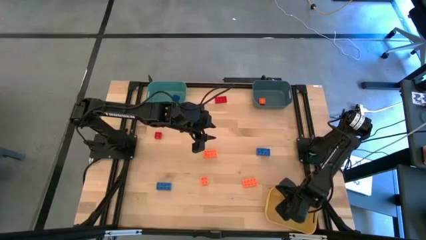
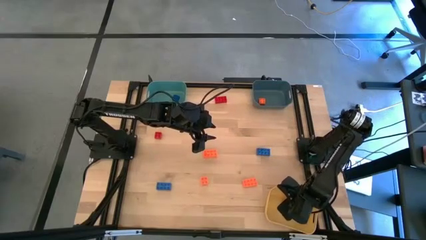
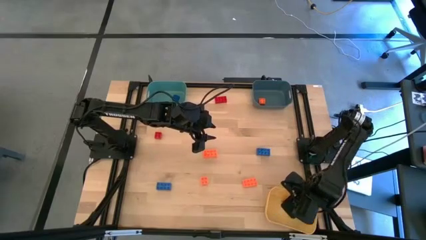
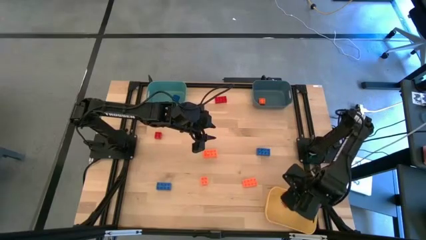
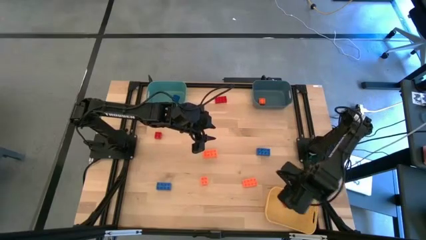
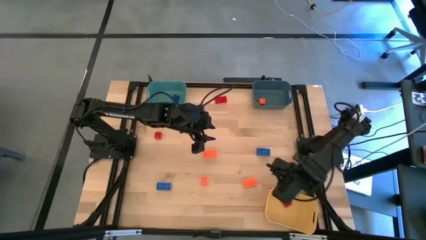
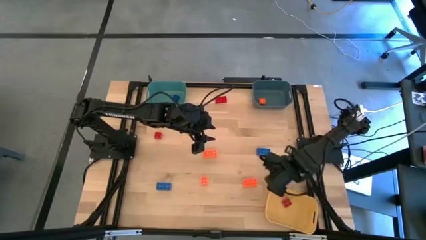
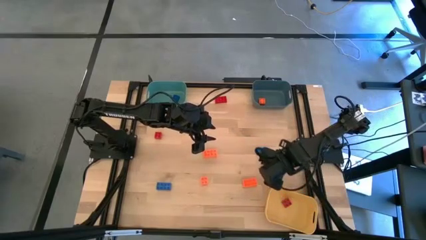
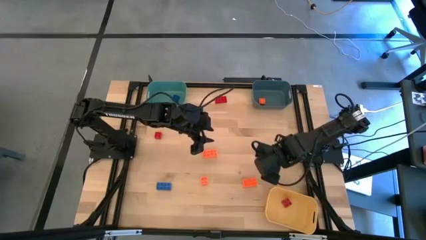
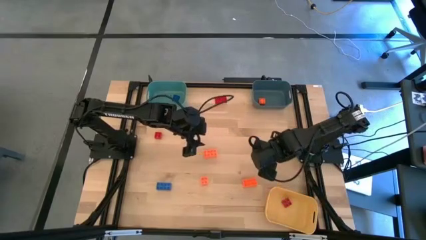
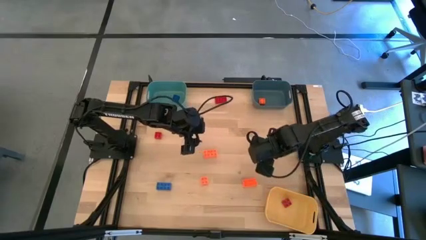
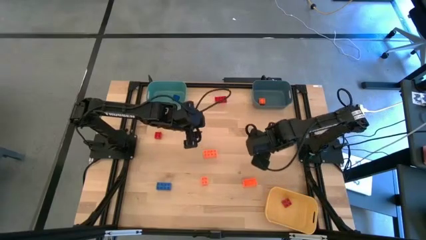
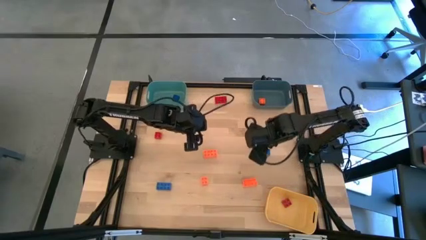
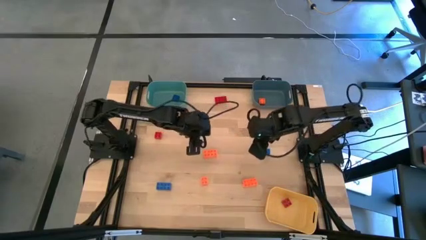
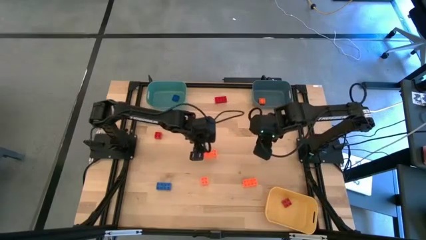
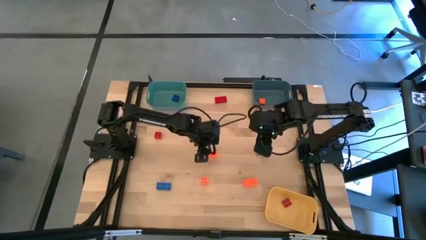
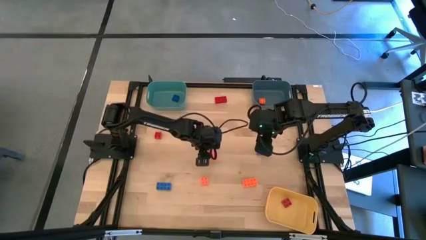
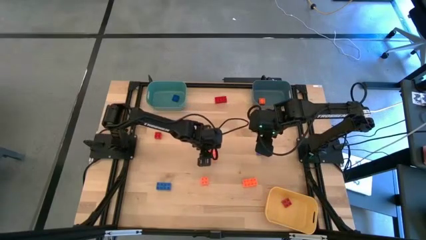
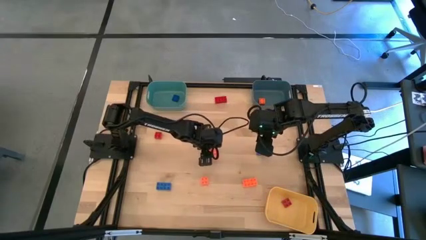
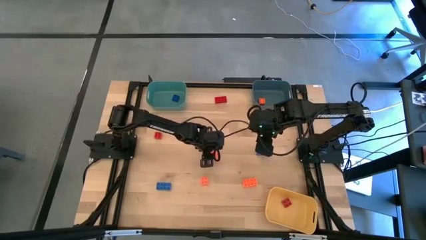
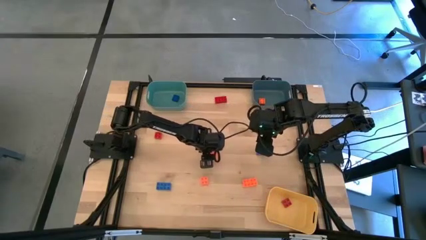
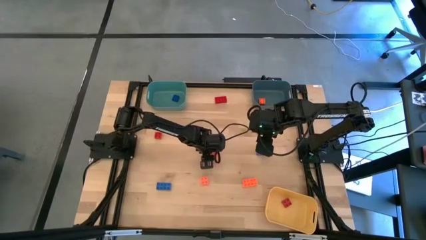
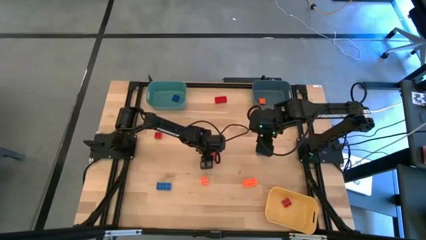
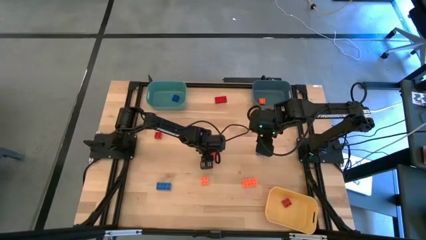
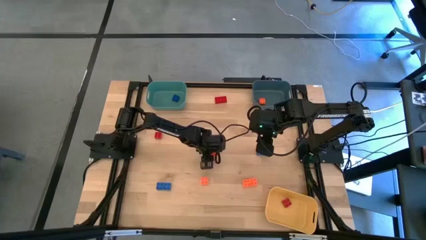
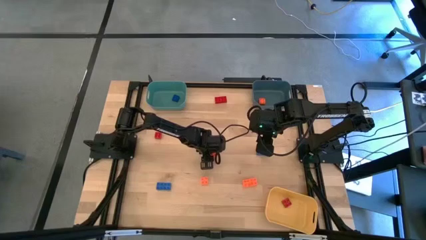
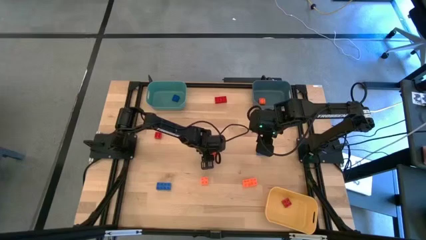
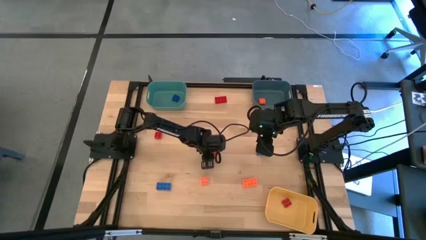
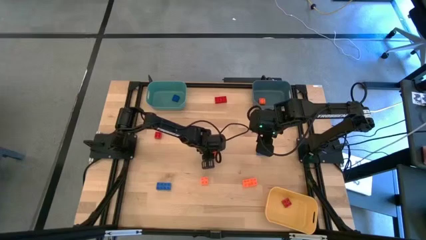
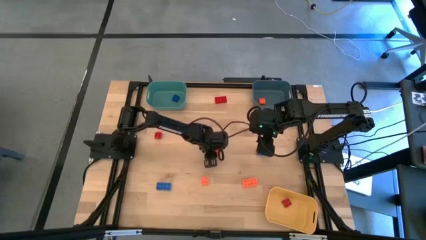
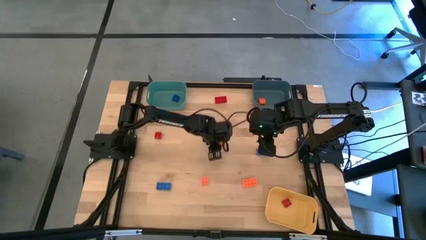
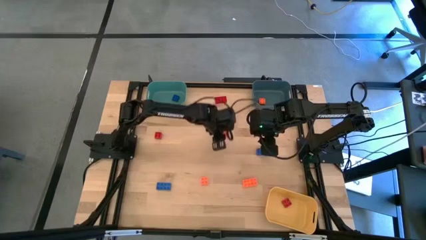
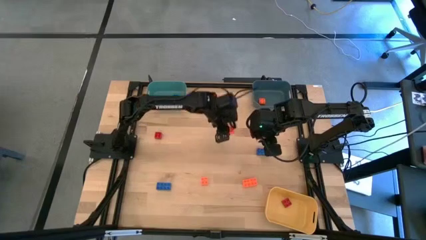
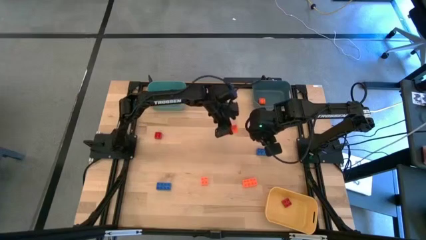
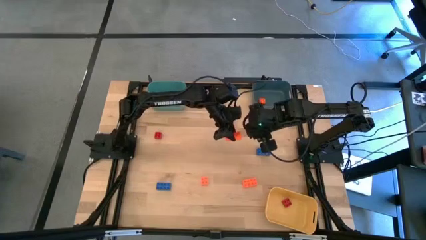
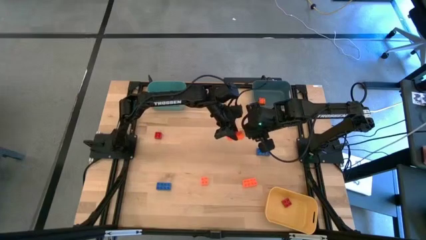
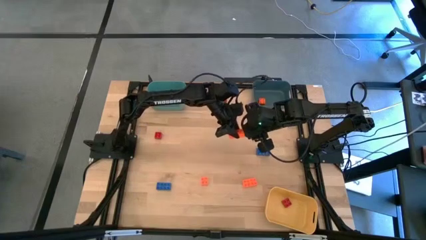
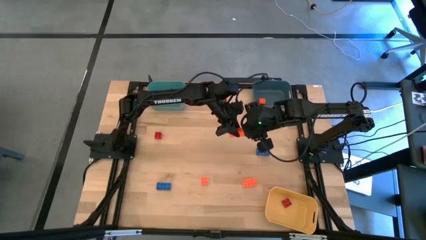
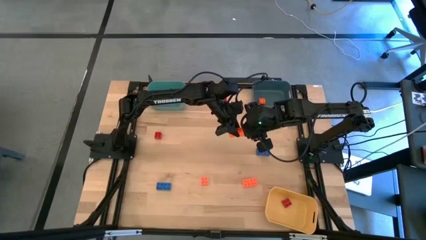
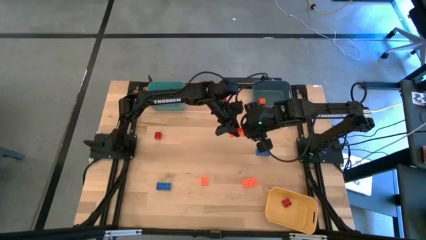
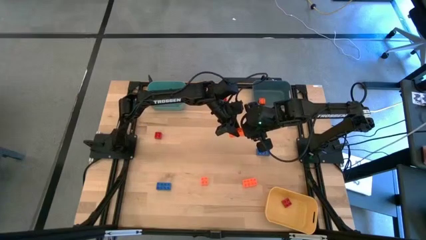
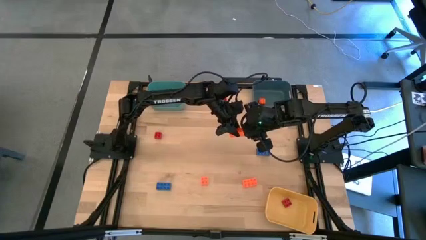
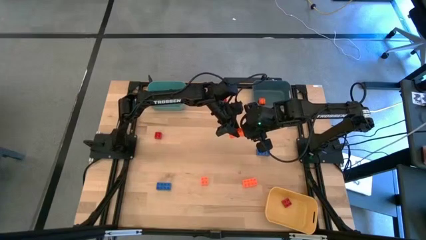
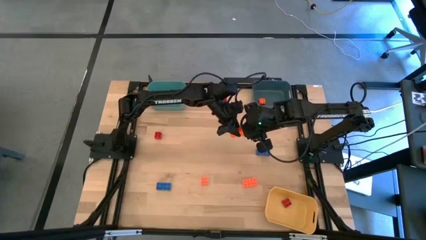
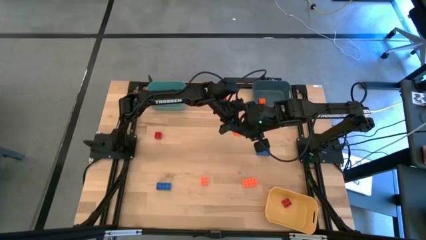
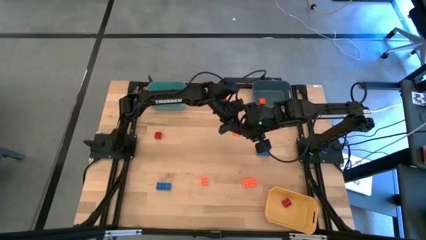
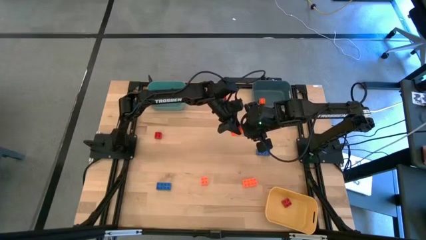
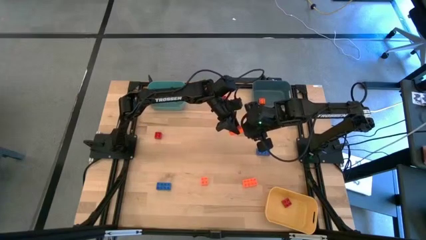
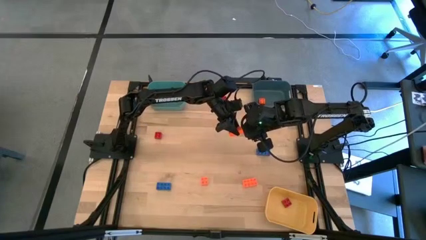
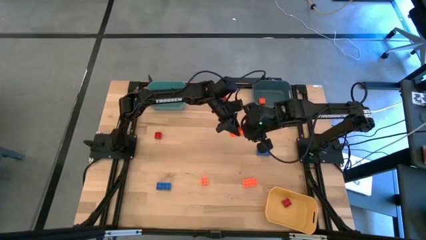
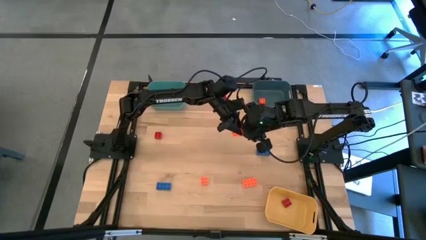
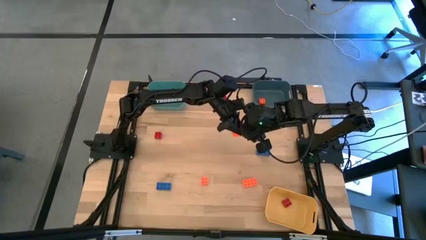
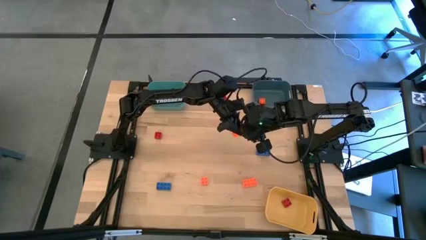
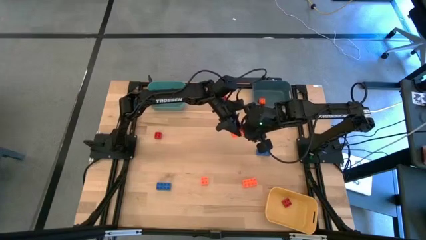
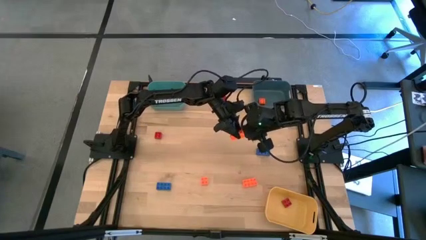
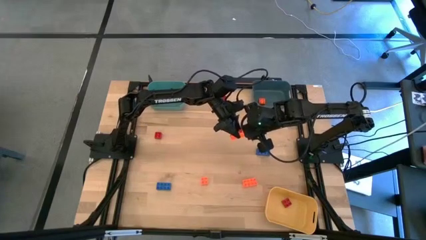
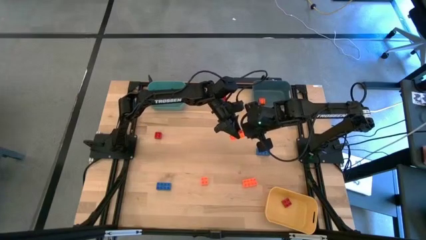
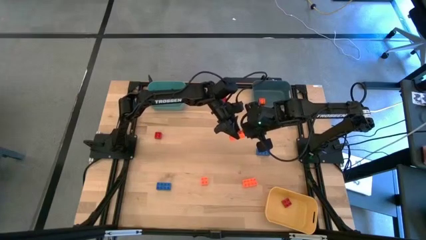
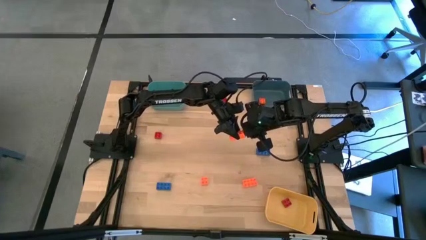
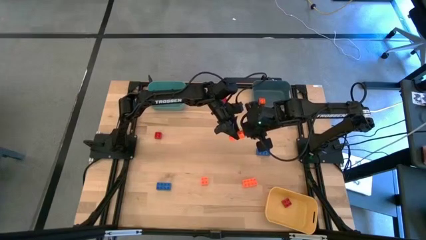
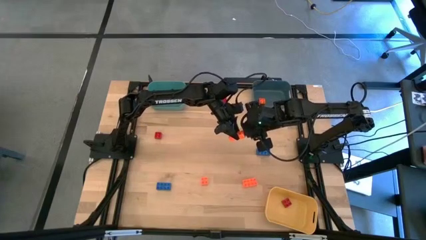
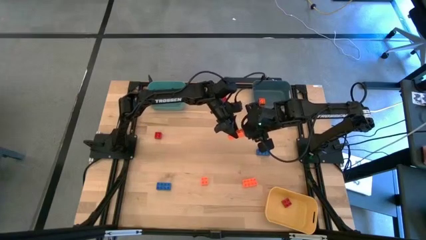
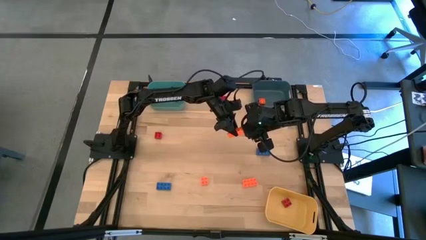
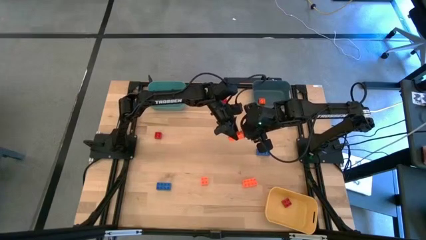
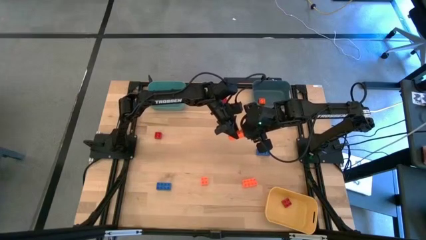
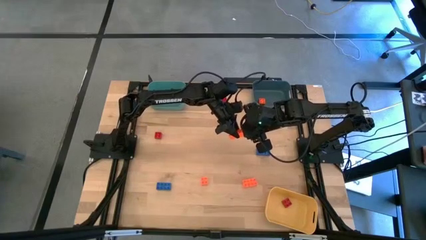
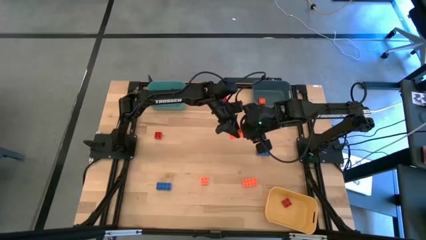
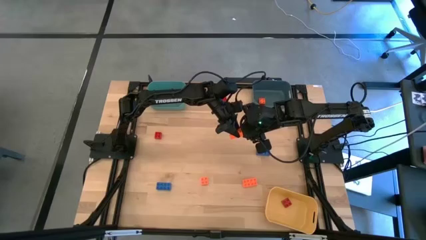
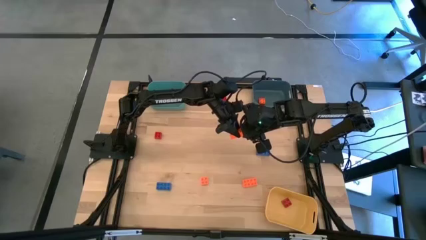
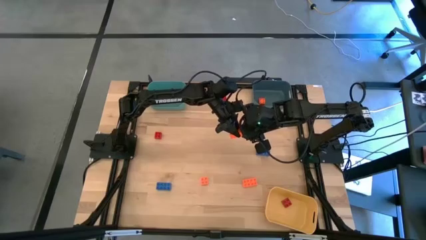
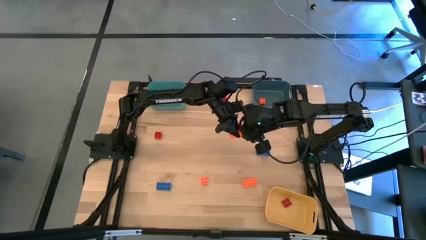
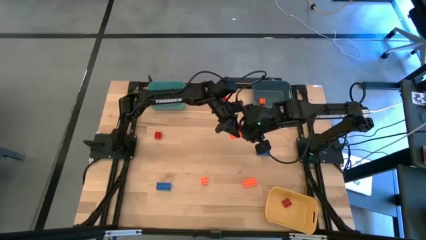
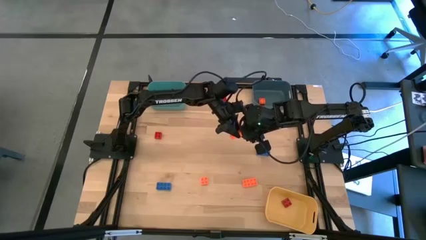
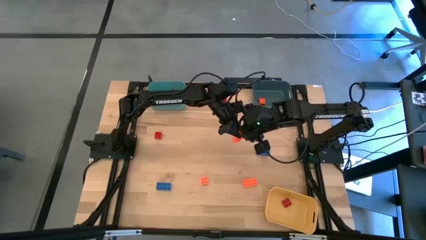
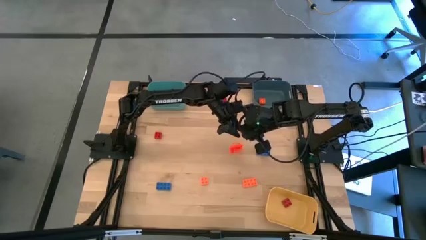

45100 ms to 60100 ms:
Task: Sort & place blocks by color
Put the orange game piece into the dark blue bin

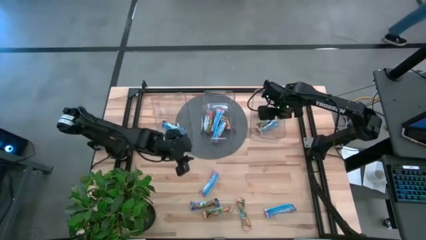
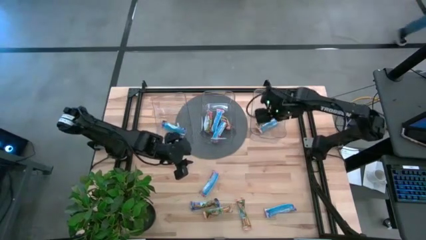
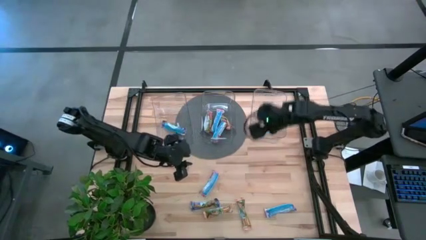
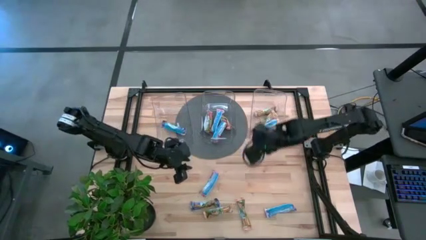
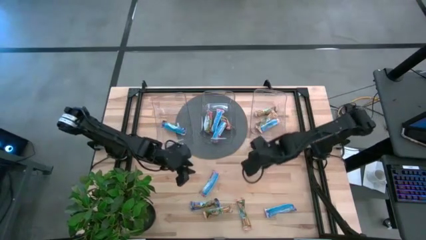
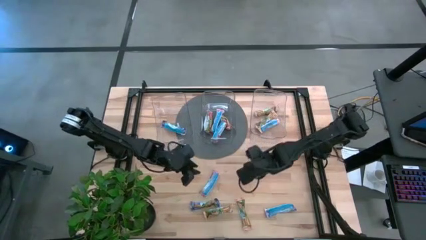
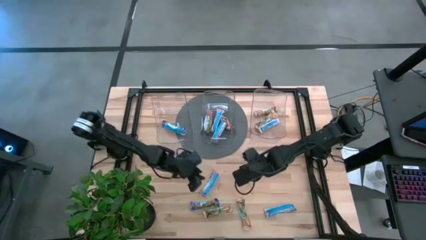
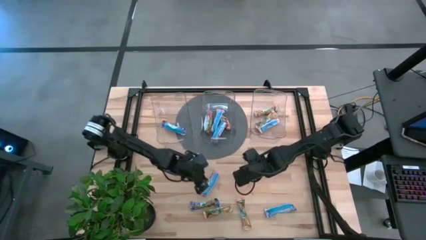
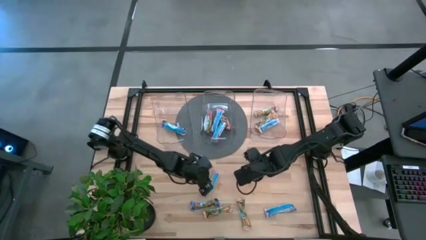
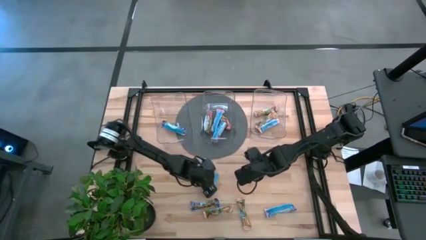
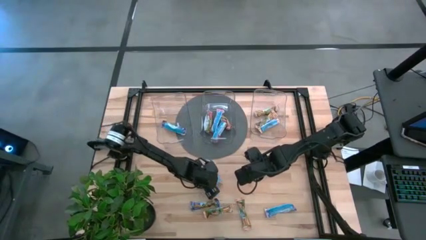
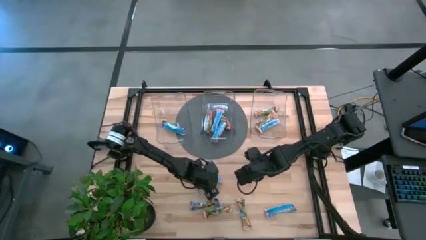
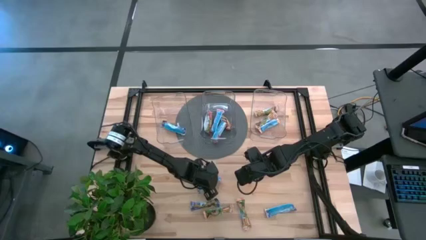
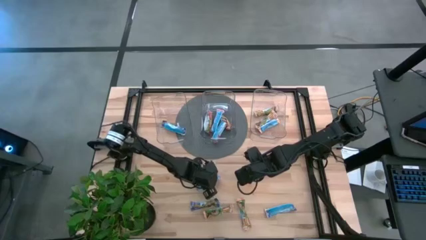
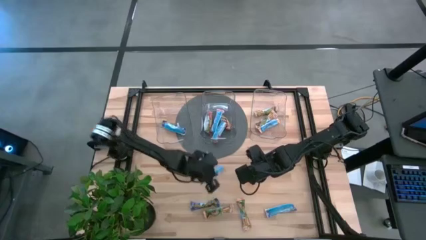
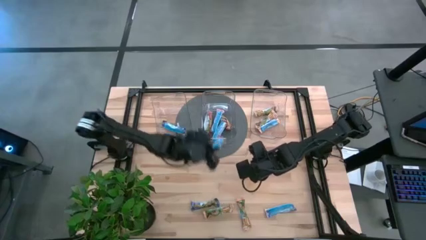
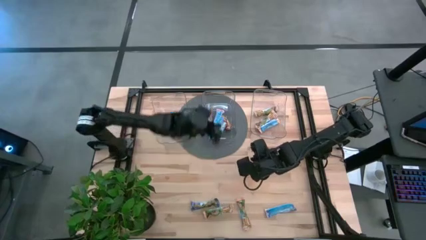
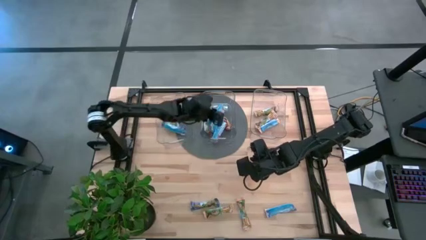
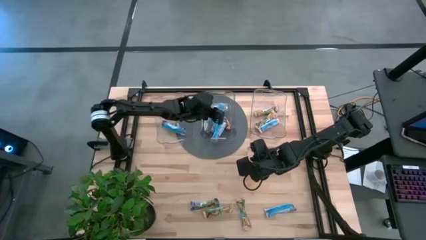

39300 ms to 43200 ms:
Task: Pick and place Granola Bars by type
Put the red granola bar into the middle transparent bin
